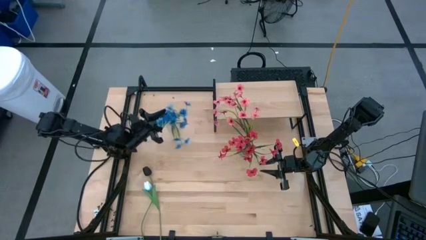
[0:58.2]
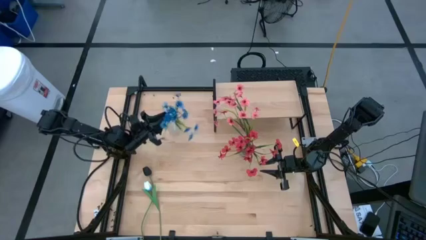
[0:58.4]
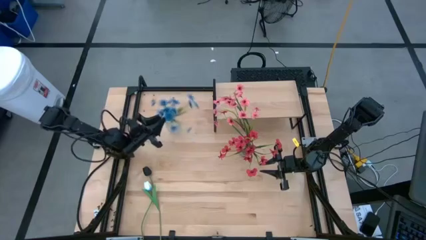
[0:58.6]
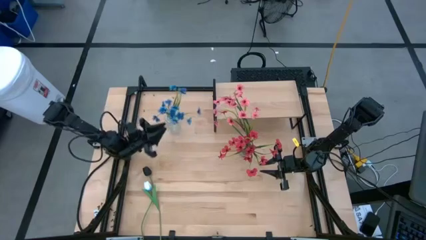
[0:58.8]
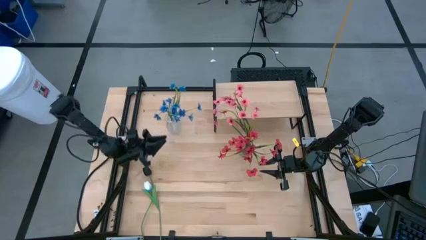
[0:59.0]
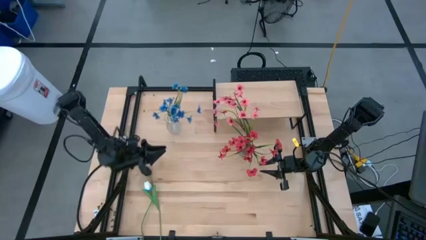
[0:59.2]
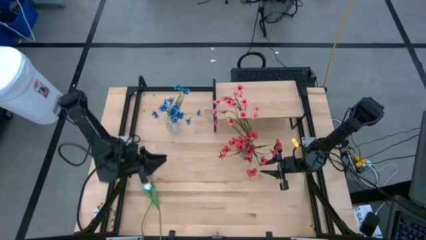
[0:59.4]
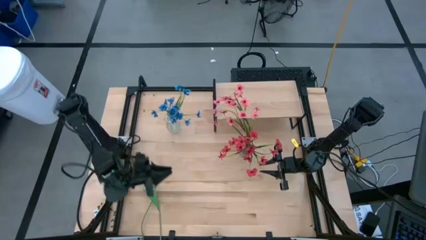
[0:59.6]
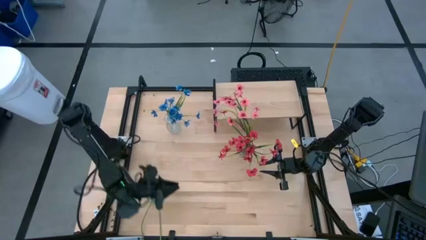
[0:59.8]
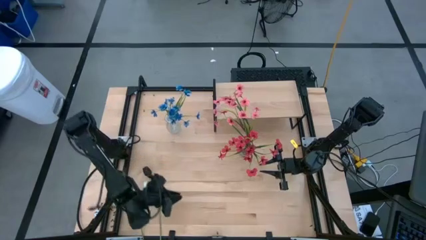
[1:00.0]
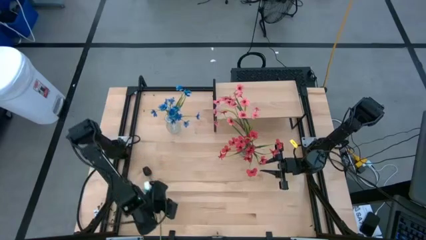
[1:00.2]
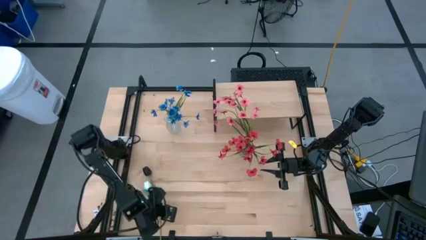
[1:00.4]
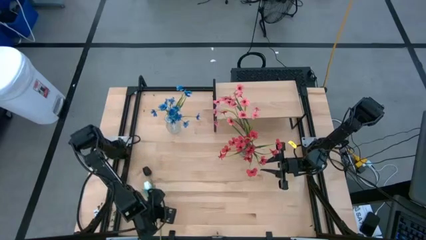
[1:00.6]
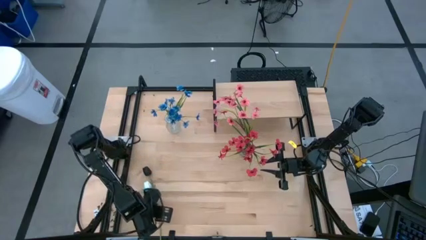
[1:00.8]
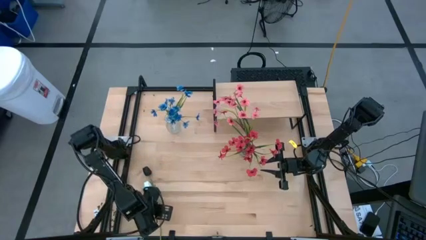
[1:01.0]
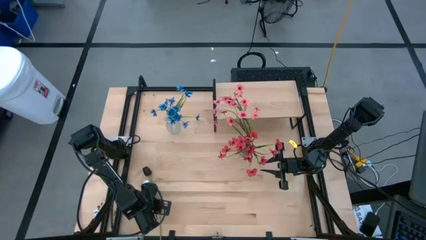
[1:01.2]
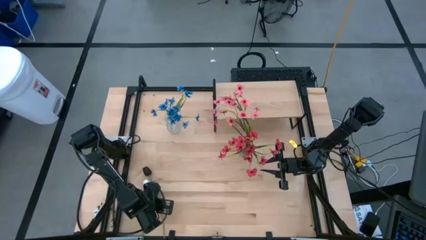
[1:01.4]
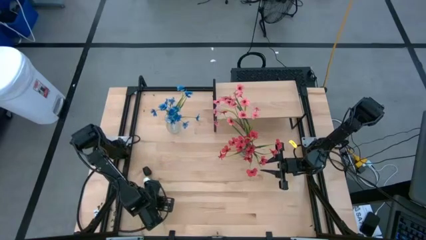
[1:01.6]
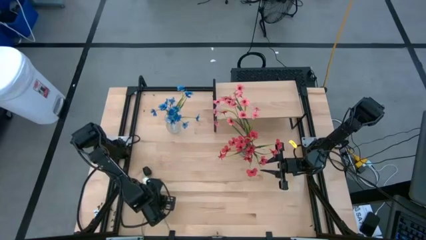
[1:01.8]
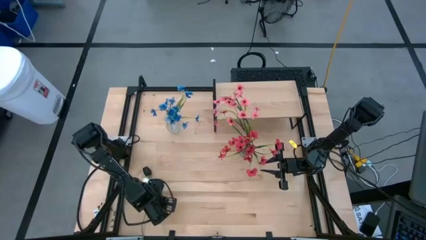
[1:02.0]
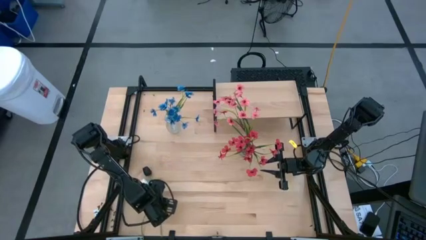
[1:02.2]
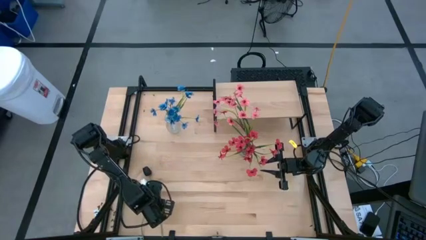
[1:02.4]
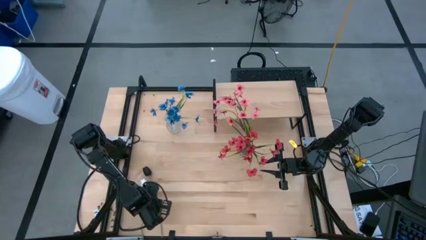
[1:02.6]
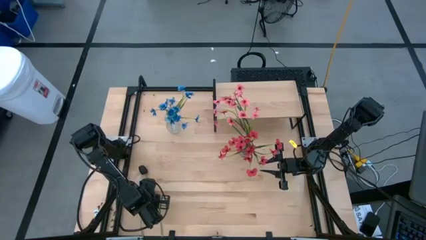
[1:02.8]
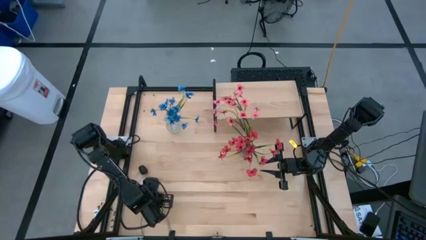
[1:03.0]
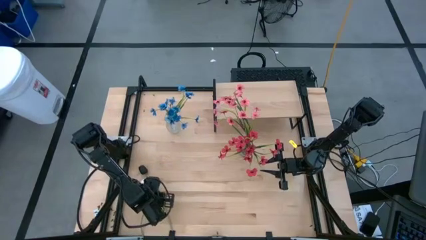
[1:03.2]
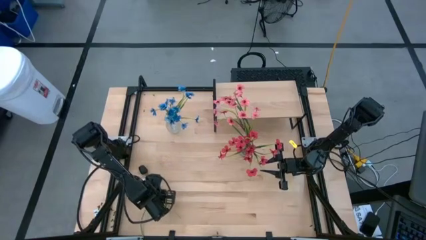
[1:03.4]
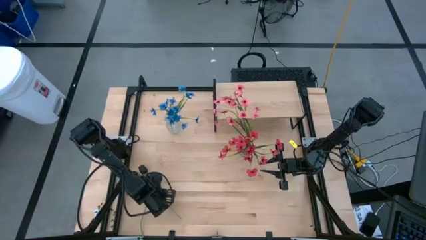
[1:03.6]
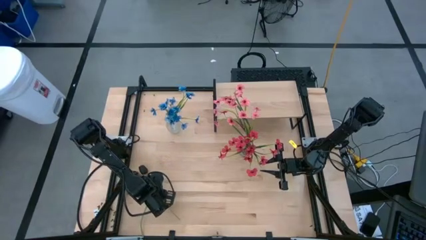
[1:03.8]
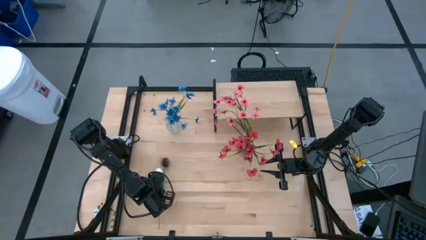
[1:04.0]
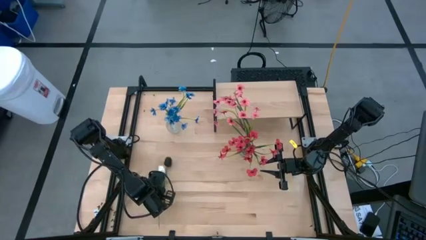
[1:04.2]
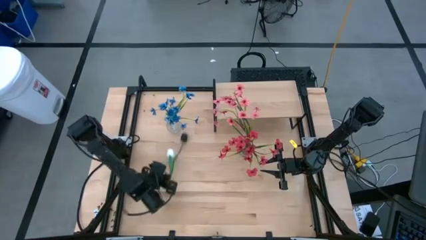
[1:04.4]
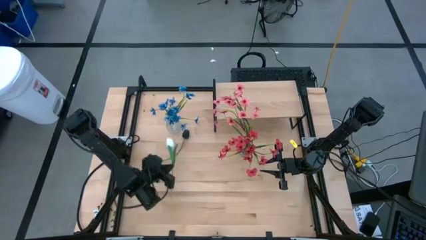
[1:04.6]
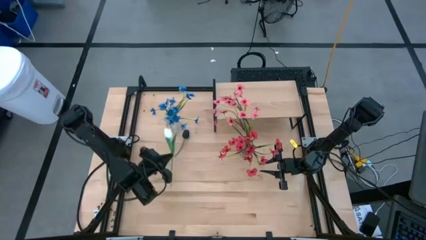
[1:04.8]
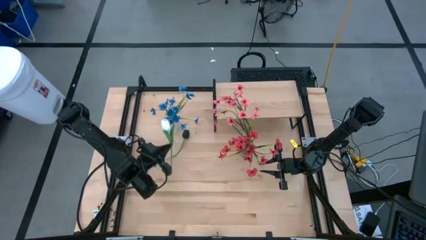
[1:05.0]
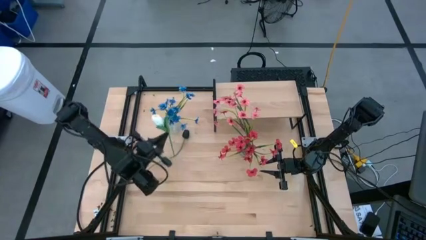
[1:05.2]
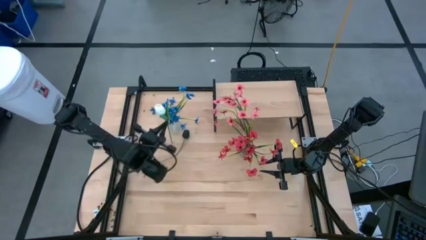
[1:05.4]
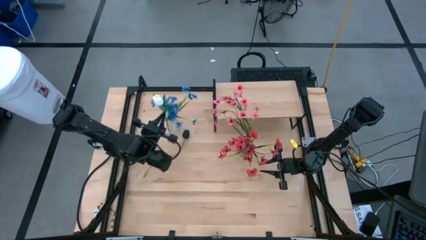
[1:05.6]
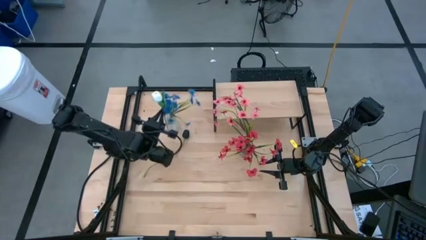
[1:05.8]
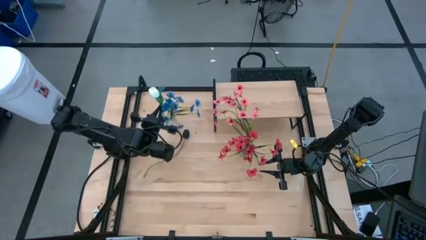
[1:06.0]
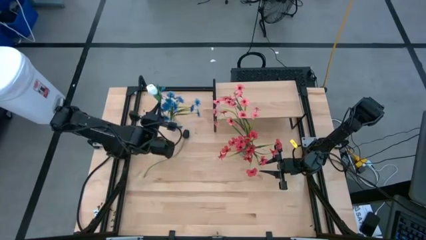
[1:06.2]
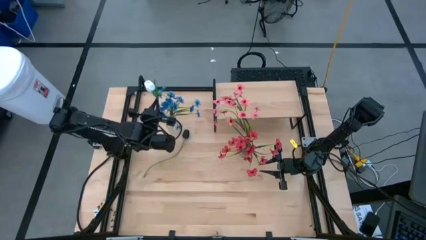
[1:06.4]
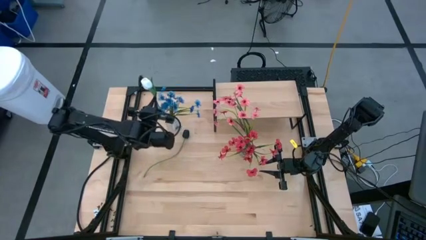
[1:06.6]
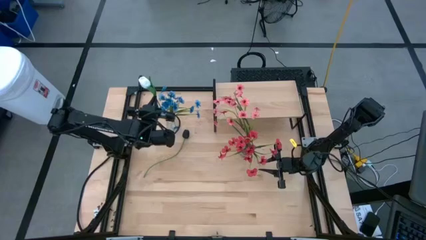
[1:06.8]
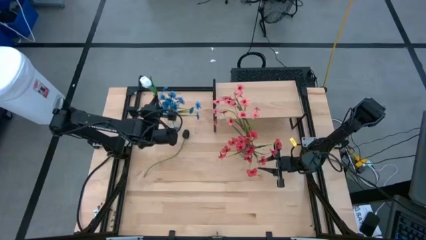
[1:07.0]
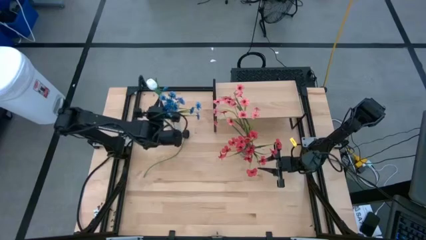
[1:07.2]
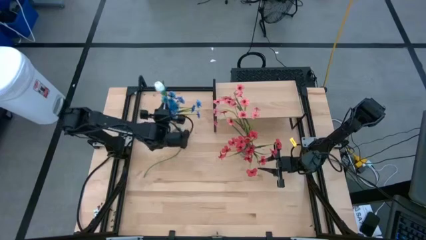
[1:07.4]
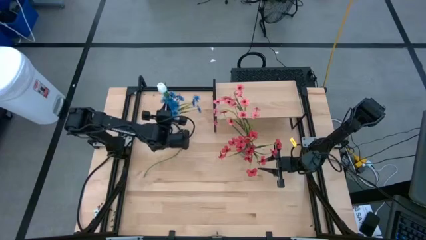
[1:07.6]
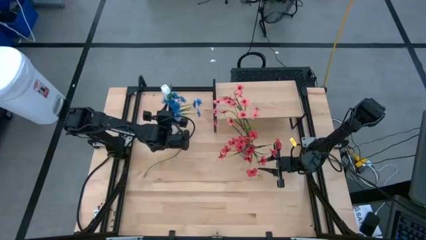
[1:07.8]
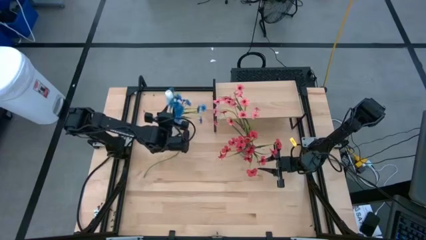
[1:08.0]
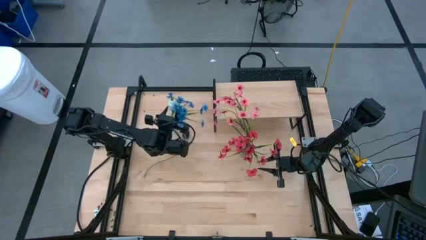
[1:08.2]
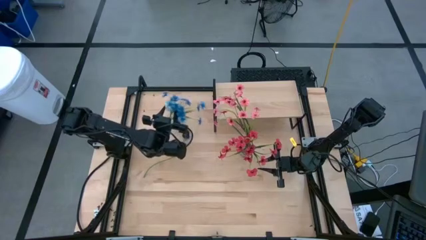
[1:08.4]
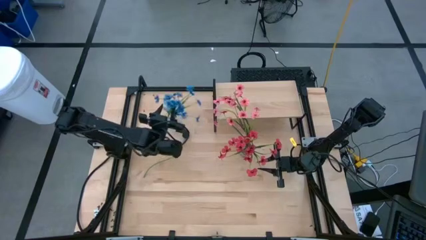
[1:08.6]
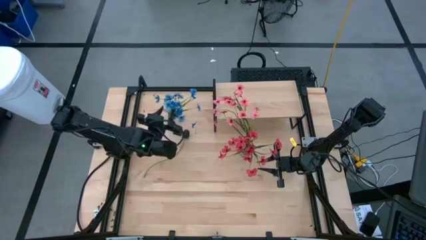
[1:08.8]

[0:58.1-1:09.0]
Task: Pick and place flowers into a vace then onto a shelf
Put the white flower into the left transparent vase

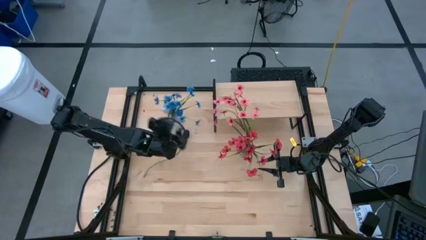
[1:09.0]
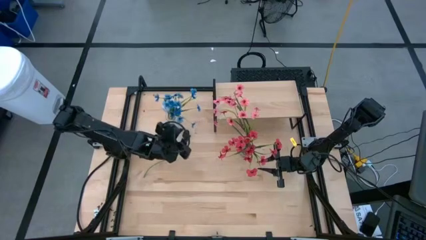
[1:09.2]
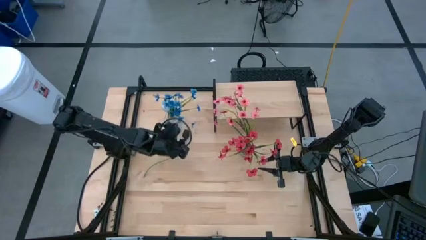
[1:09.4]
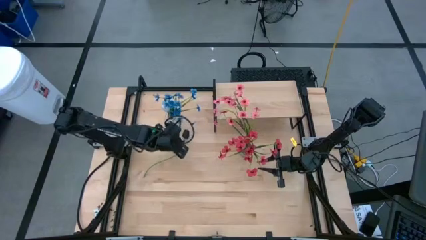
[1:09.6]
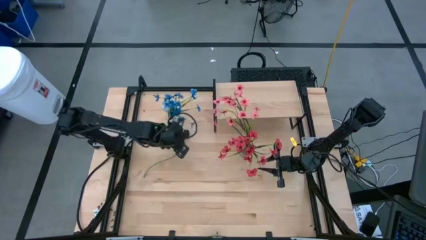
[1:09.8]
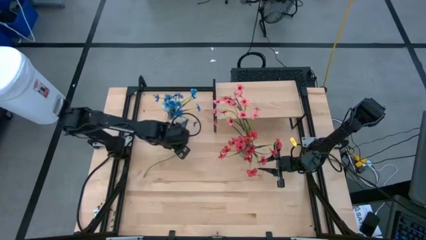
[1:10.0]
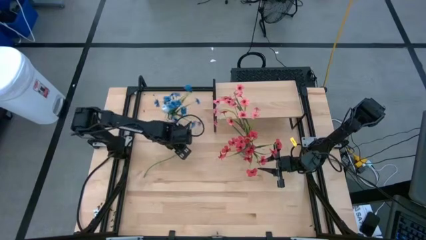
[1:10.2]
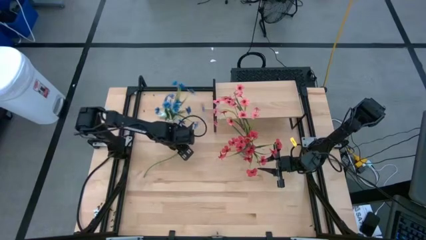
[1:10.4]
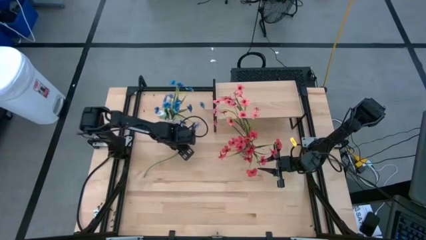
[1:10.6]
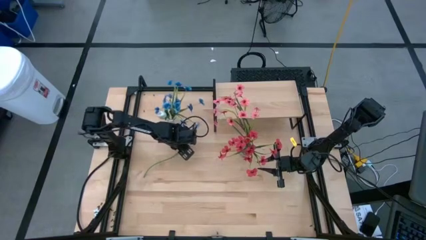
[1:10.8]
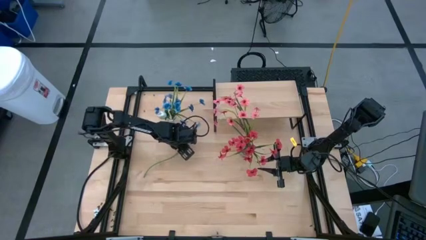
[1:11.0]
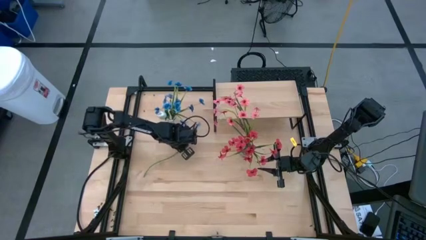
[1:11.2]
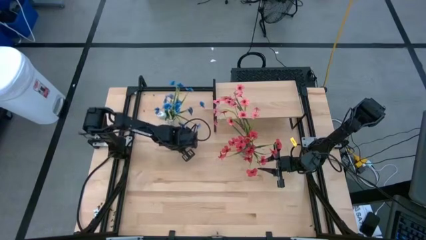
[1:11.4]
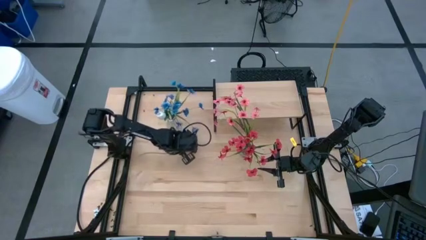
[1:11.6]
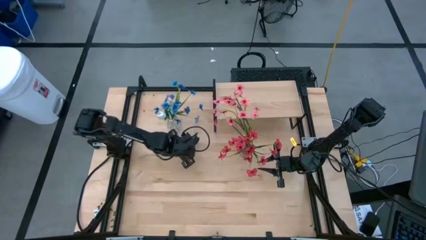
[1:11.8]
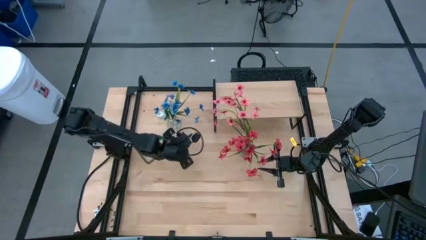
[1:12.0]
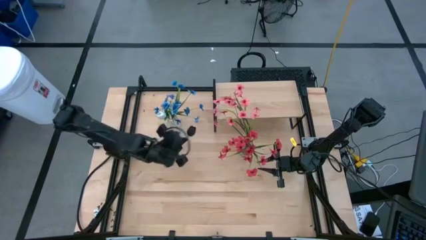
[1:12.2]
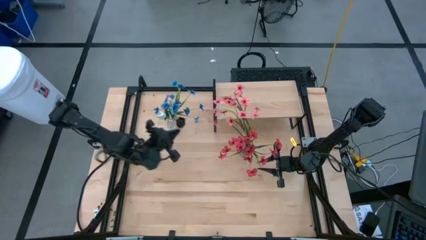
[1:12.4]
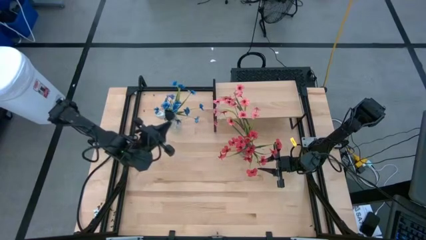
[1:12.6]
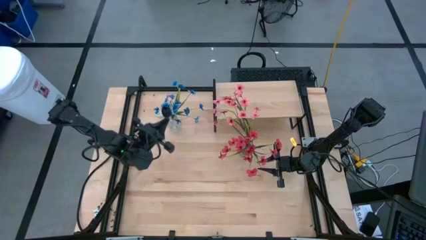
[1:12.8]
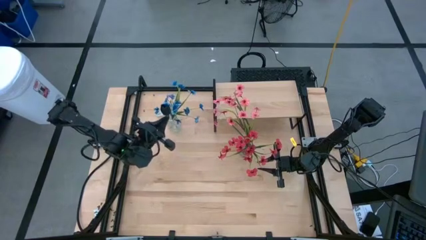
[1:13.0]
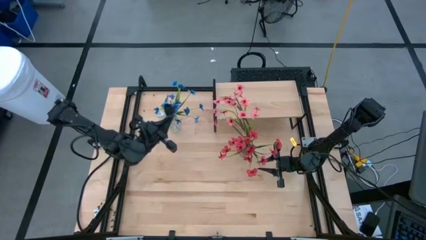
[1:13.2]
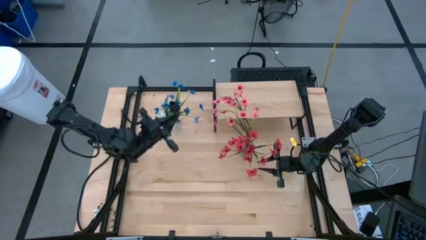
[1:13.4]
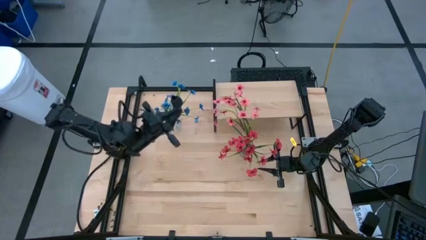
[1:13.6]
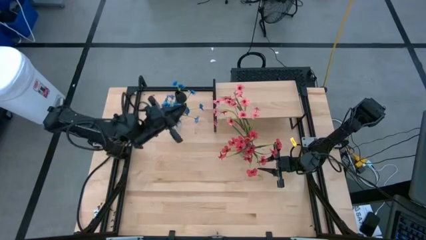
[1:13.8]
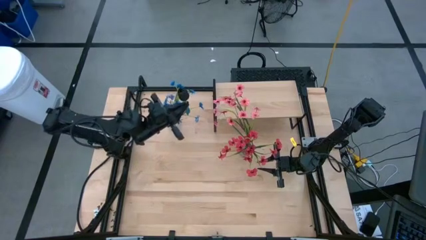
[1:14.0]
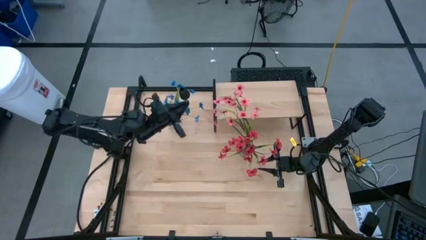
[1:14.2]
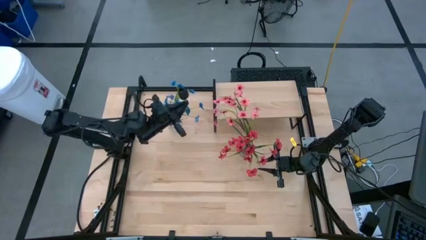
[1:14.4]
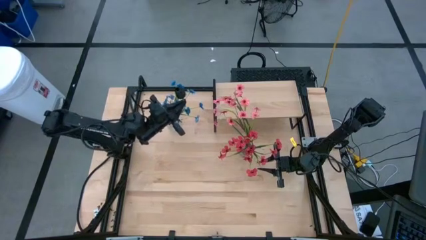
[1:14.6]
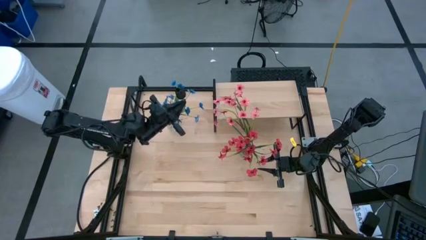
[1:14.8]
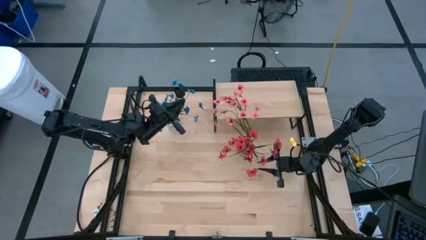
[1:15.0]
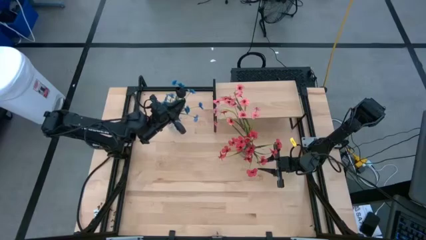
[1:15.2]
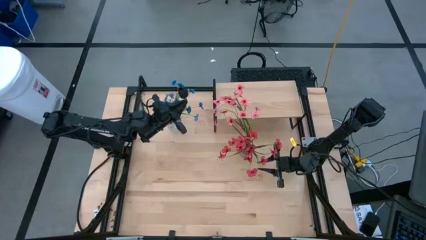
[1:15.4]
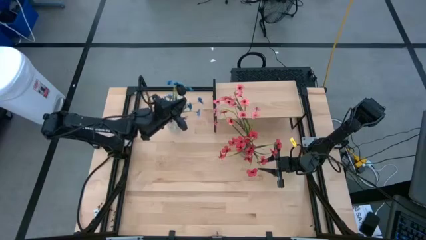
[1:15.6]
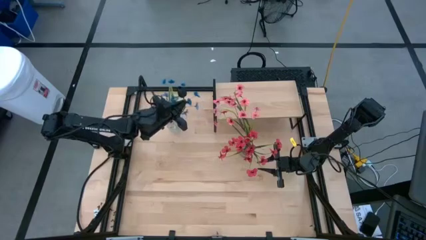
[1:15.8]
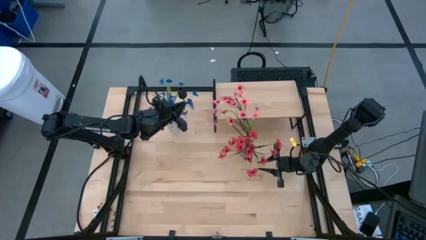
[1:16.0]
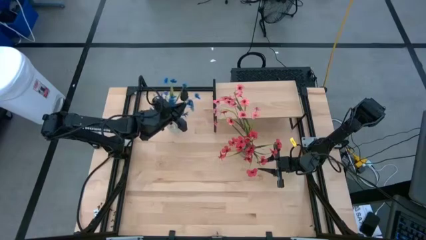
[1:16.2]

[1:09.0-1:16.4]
Put the black flower into the left transparent vase
